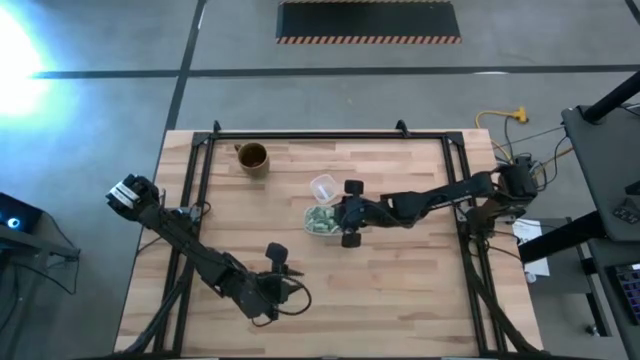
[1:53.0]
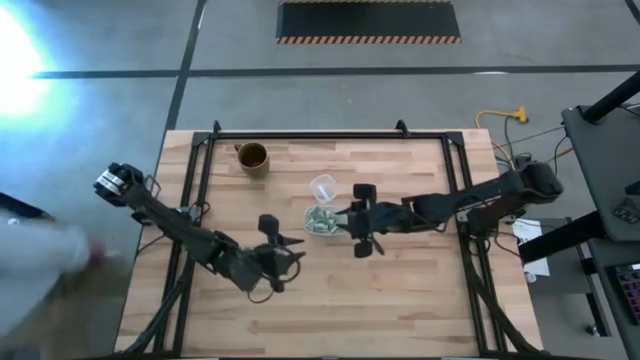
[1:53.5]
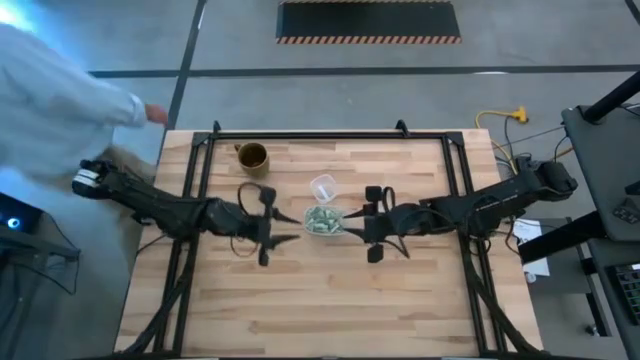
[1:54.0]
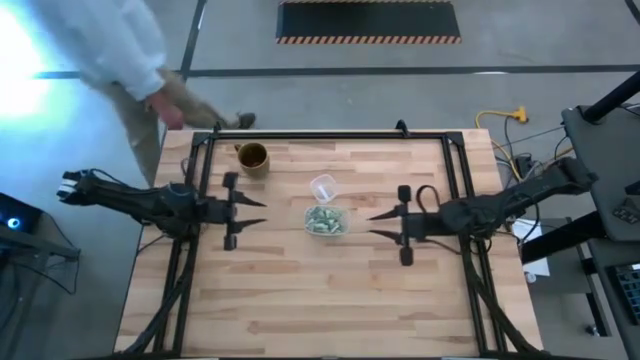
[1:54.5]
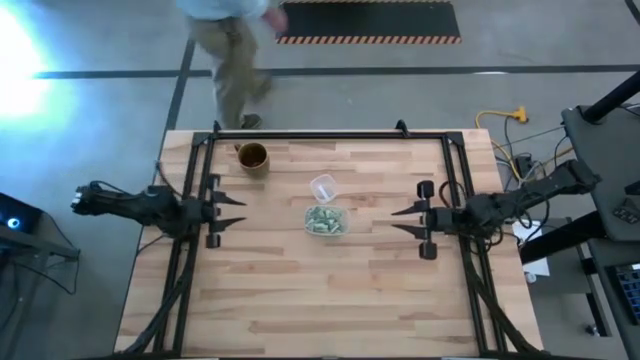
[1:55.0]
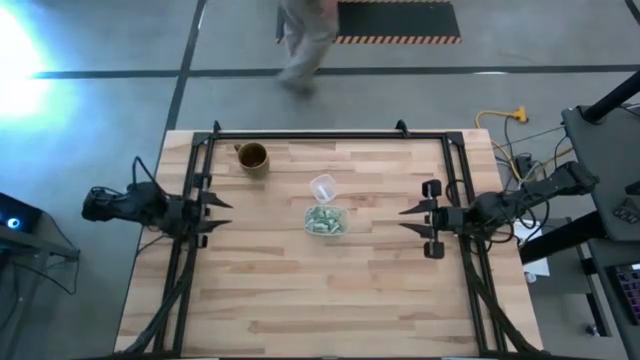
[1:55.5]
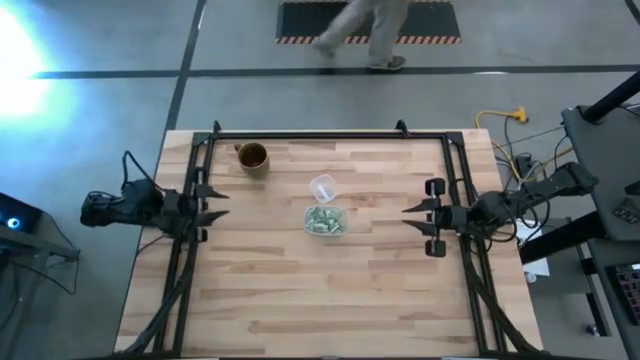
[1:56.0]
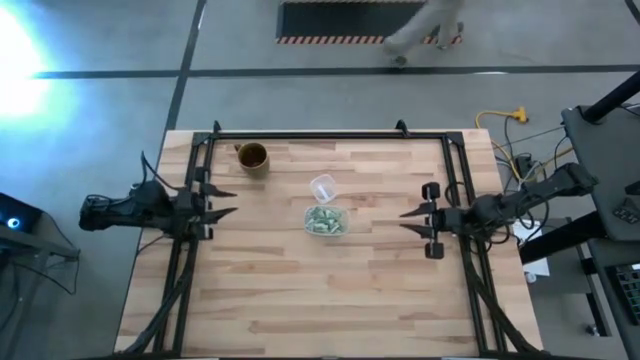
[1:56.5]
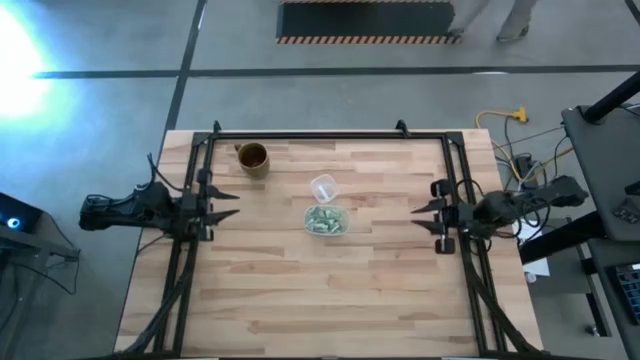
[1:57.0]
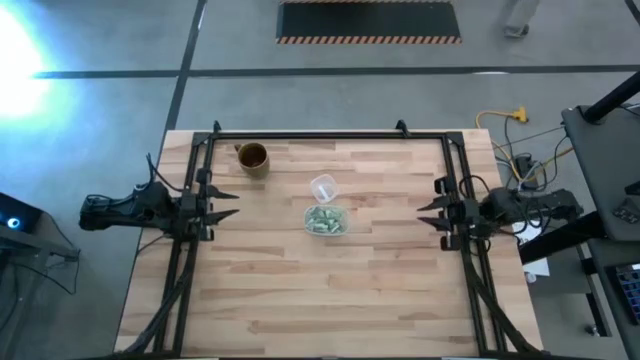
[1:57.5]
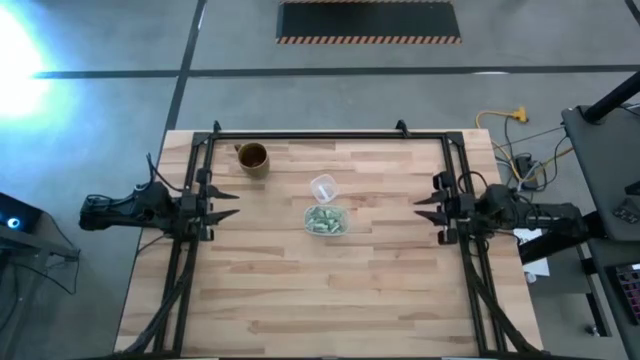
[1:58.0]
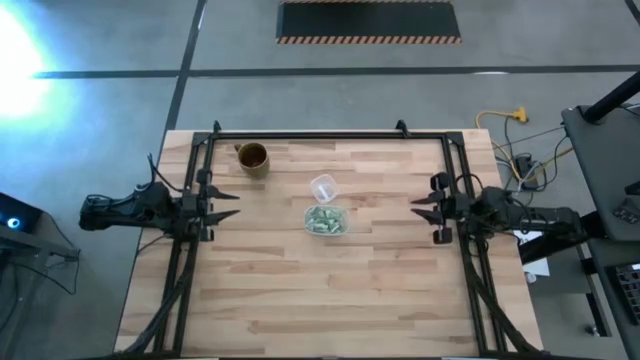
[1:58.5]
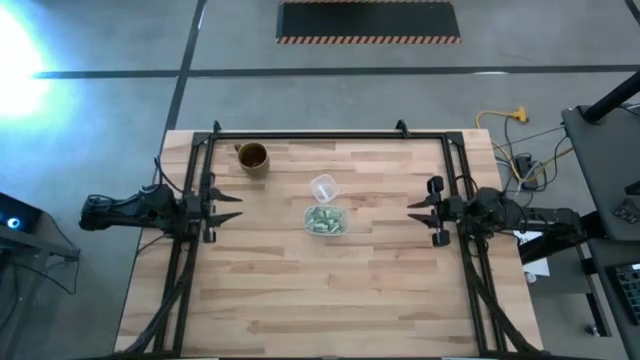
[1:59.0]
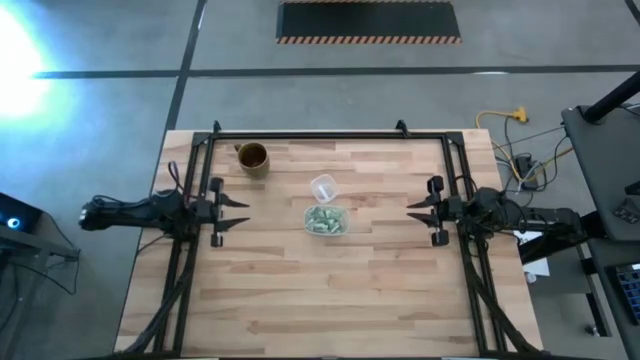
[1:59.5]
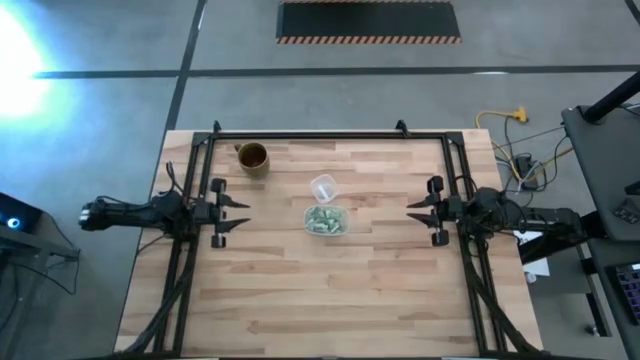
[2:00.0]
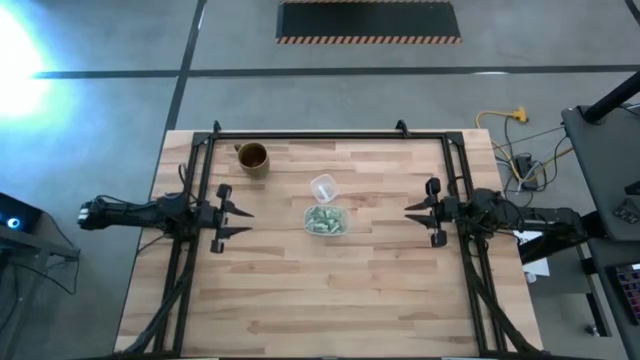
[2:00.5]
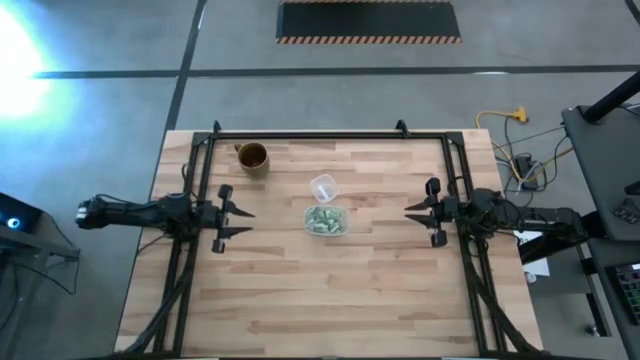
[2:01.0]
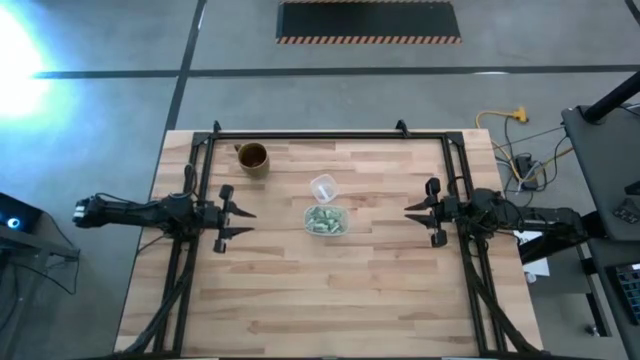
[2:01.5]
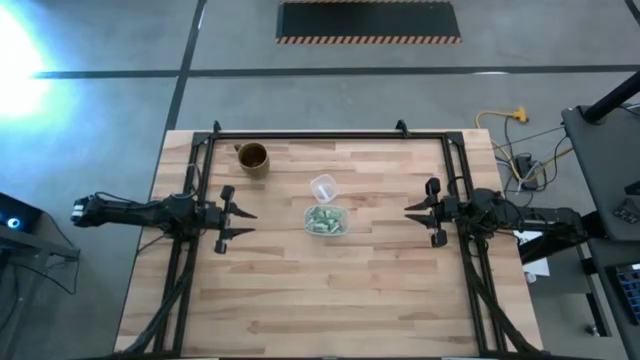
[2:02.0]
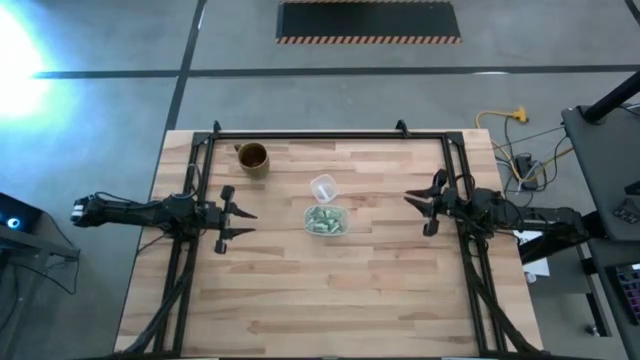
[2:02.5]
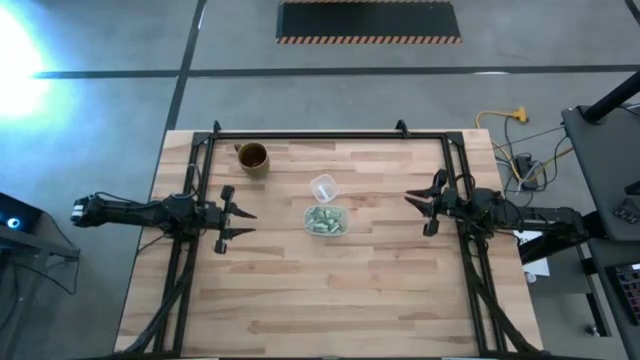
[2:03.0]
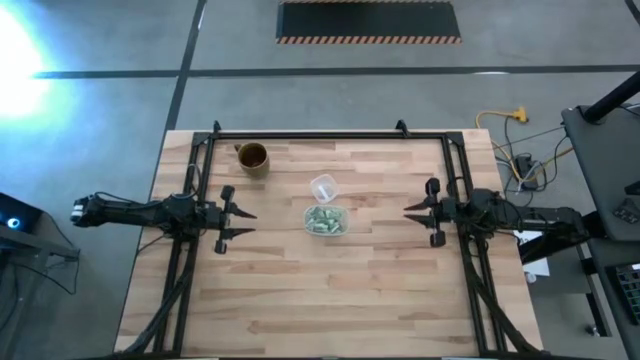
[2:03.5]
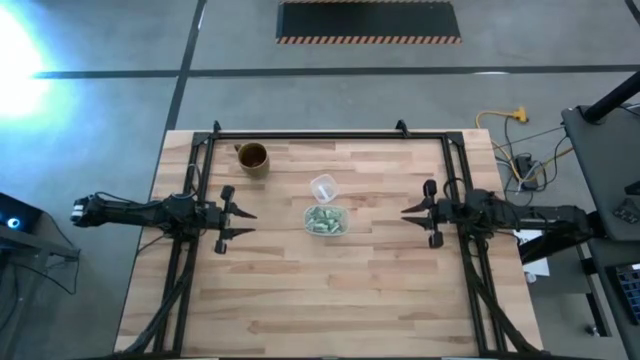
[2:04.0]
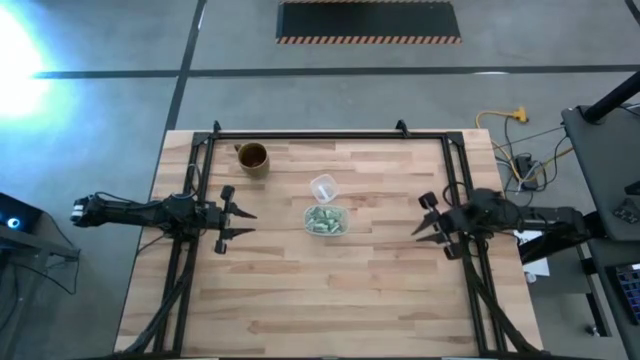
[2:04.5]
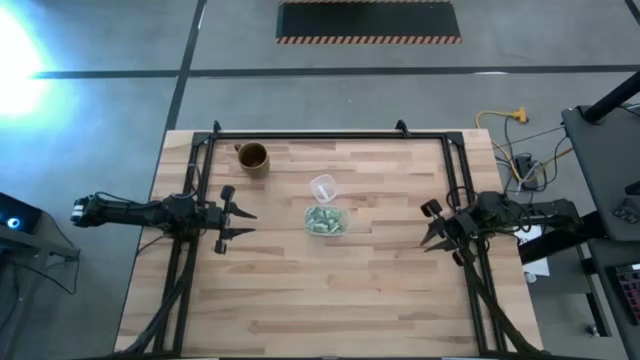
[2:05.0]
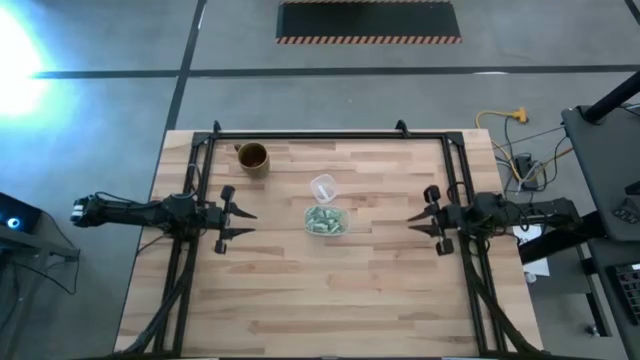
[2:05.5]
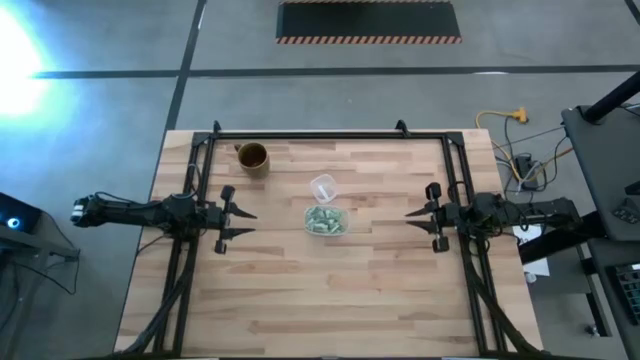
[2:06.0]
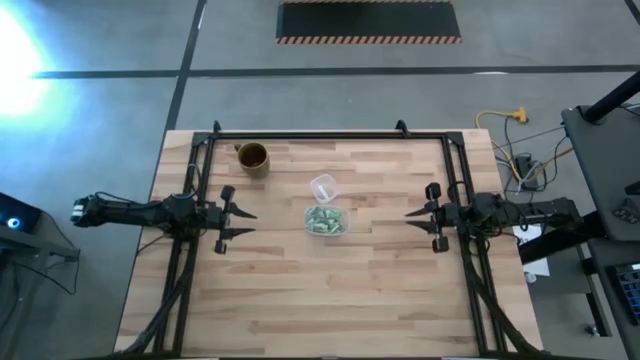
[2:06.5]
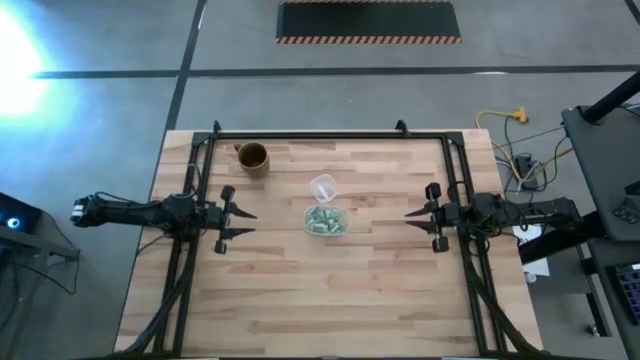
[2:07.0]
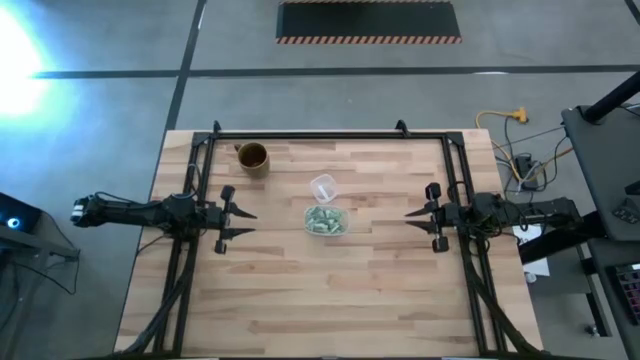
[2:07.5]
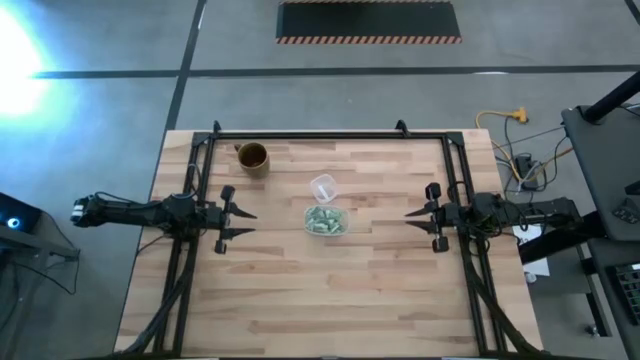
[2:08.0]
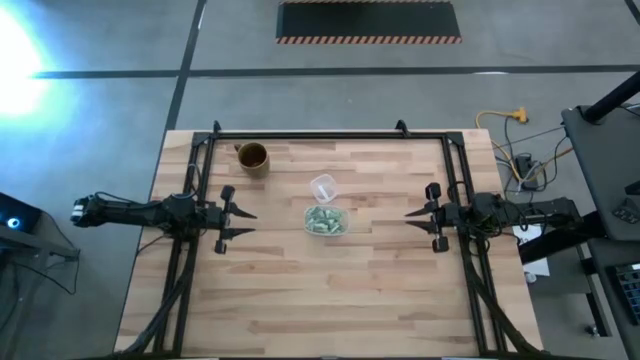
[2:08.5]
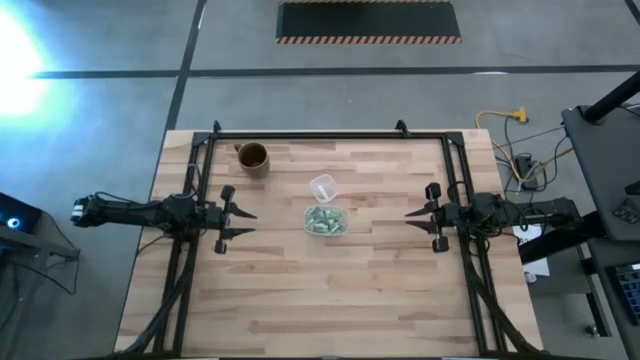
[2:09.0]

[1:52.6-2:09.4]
Task: Pick and place Stevia / Truvia into bins
Return to Home Position
